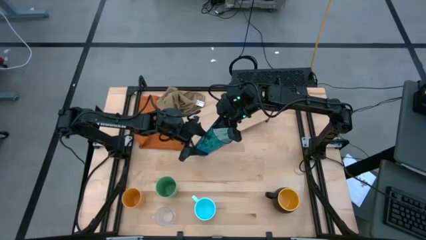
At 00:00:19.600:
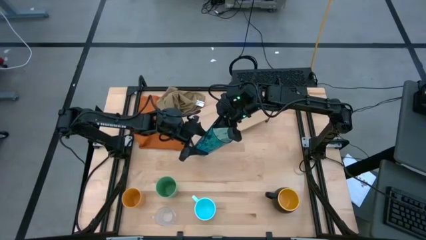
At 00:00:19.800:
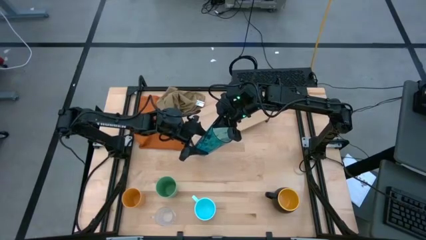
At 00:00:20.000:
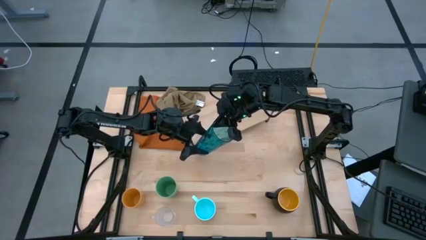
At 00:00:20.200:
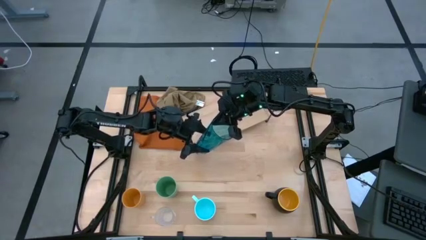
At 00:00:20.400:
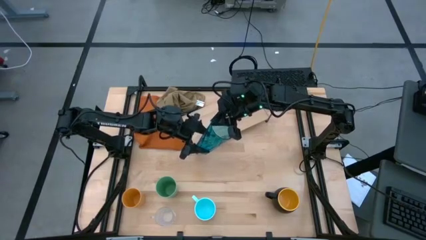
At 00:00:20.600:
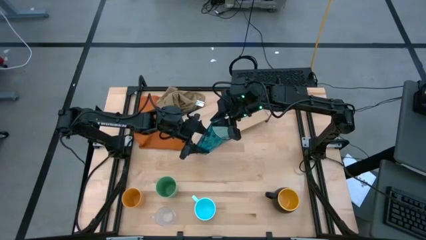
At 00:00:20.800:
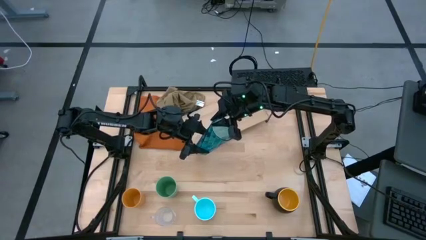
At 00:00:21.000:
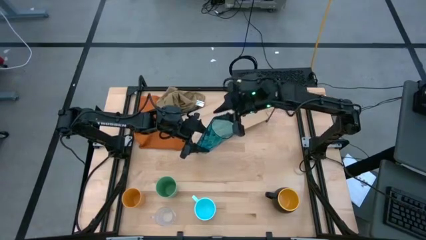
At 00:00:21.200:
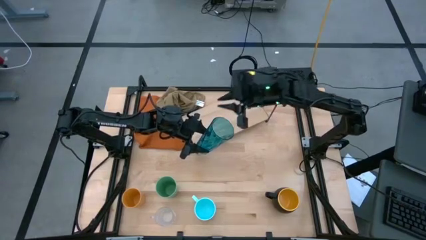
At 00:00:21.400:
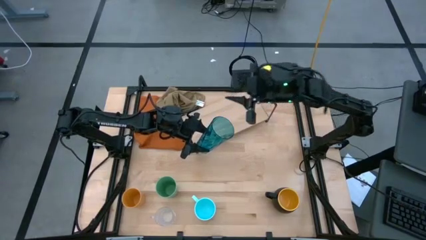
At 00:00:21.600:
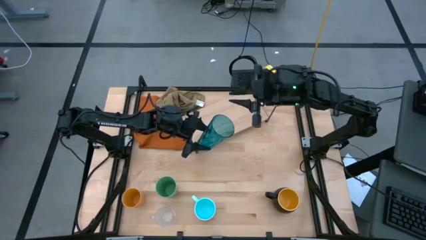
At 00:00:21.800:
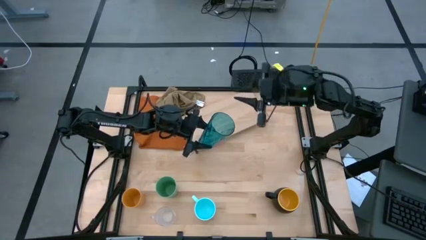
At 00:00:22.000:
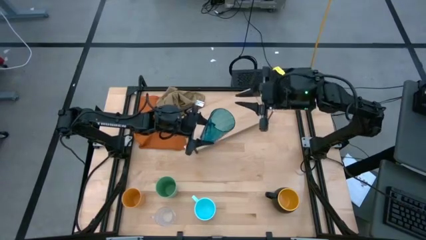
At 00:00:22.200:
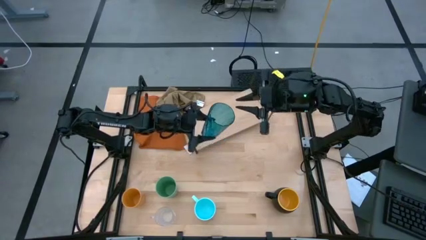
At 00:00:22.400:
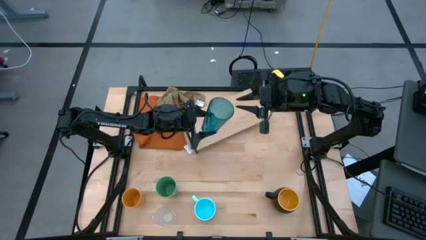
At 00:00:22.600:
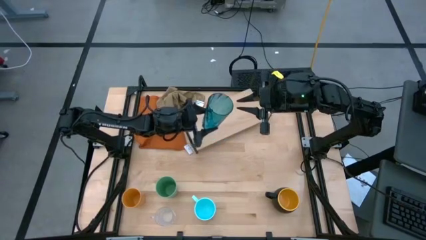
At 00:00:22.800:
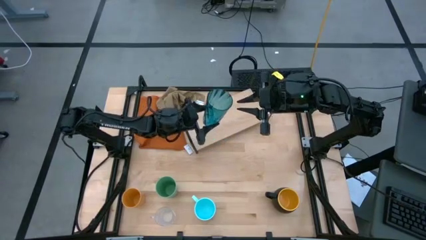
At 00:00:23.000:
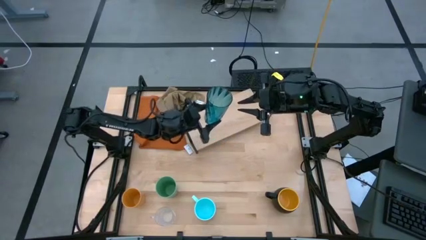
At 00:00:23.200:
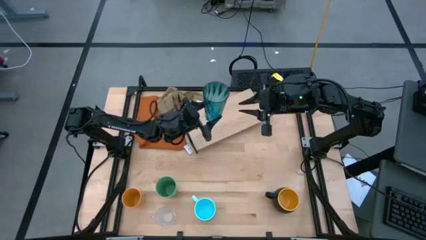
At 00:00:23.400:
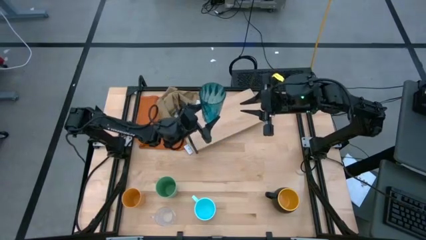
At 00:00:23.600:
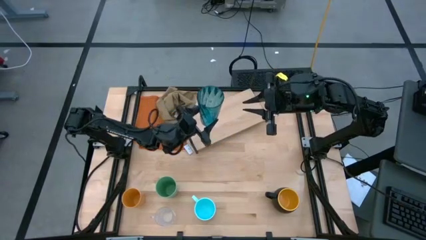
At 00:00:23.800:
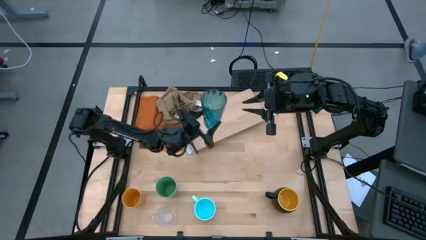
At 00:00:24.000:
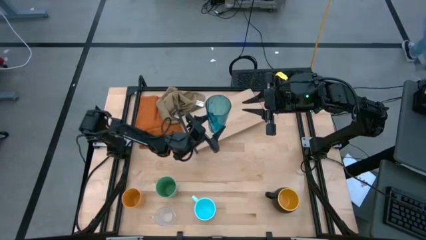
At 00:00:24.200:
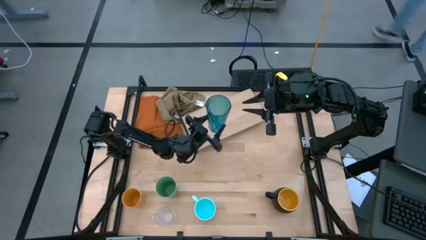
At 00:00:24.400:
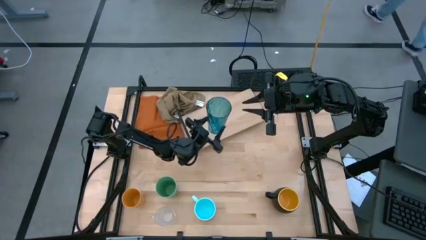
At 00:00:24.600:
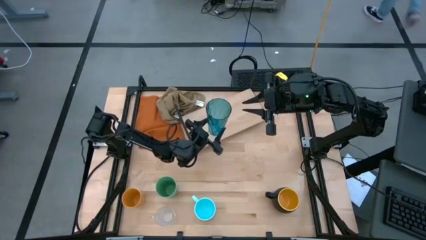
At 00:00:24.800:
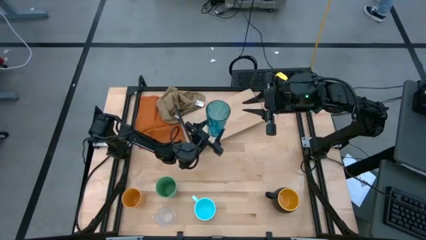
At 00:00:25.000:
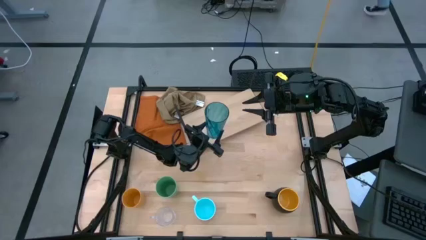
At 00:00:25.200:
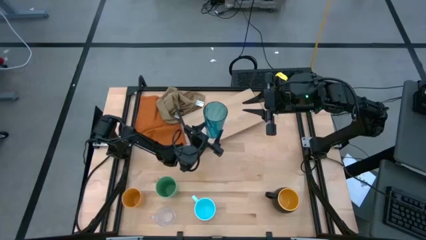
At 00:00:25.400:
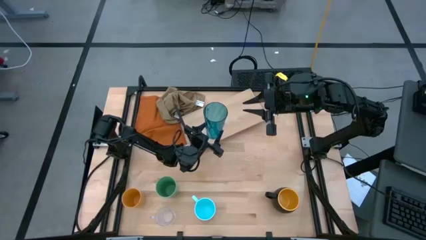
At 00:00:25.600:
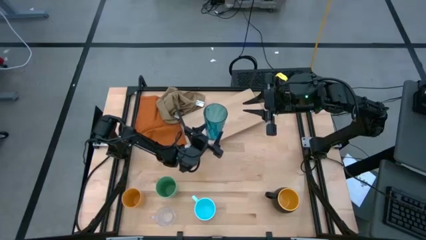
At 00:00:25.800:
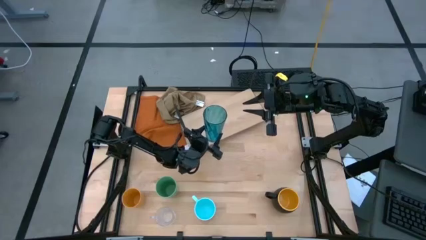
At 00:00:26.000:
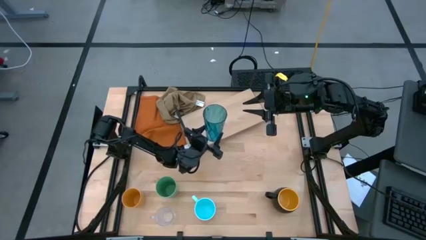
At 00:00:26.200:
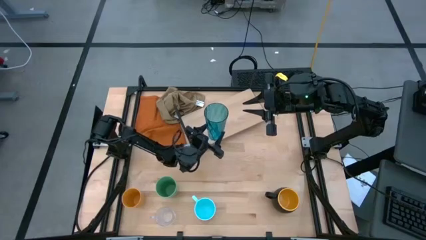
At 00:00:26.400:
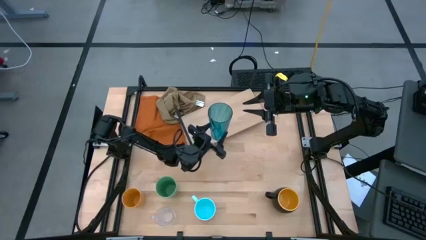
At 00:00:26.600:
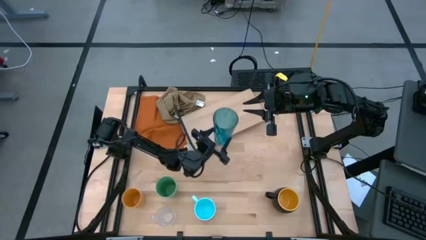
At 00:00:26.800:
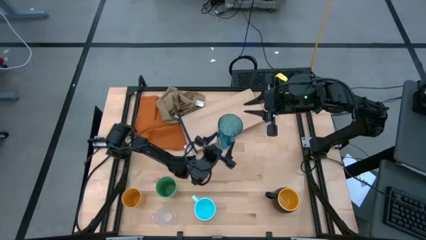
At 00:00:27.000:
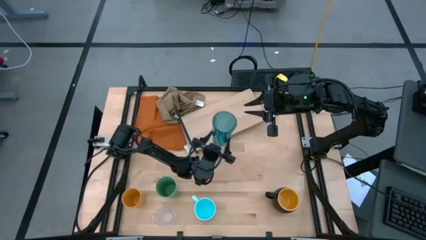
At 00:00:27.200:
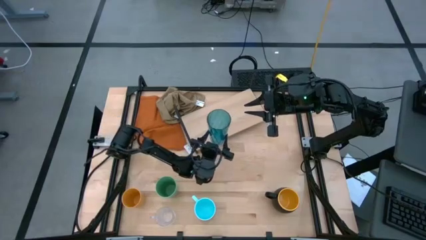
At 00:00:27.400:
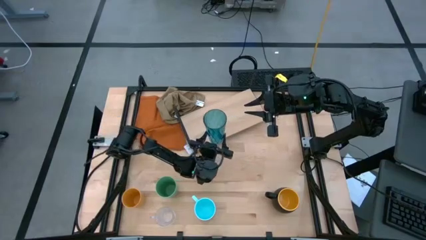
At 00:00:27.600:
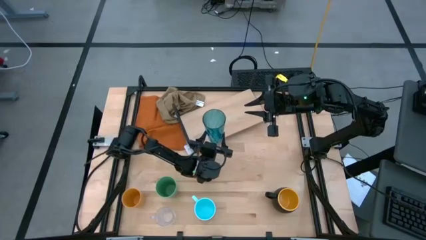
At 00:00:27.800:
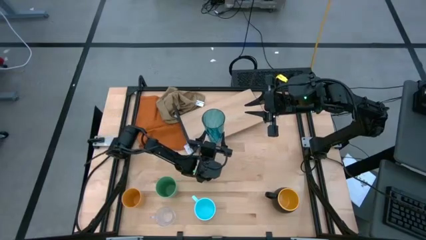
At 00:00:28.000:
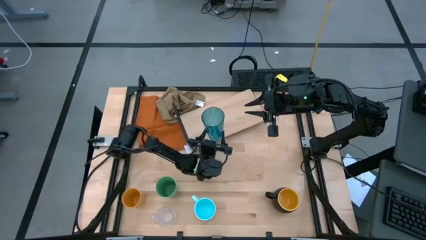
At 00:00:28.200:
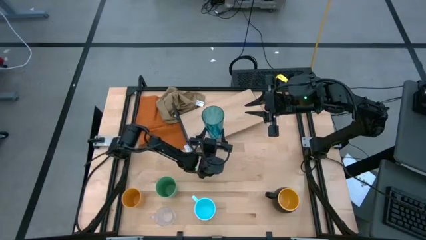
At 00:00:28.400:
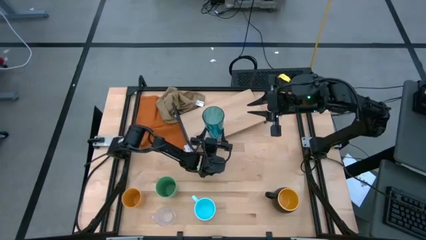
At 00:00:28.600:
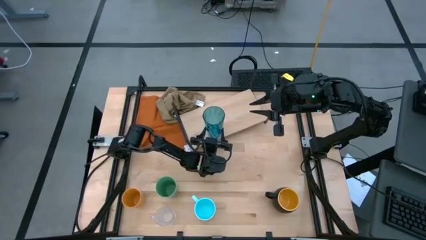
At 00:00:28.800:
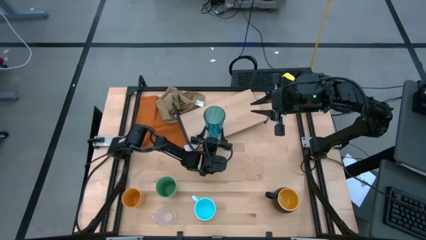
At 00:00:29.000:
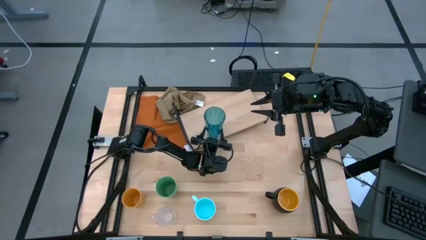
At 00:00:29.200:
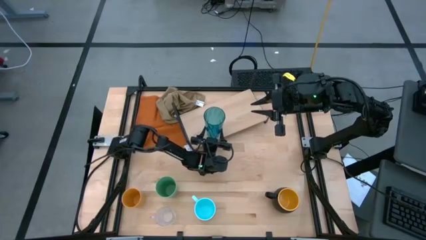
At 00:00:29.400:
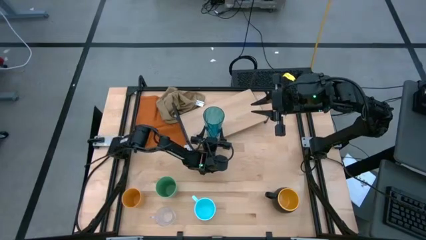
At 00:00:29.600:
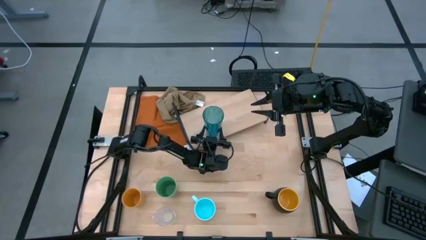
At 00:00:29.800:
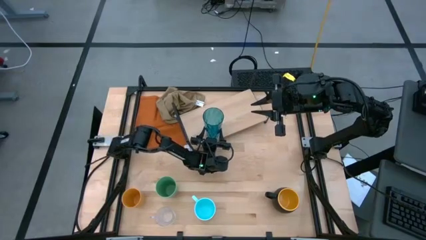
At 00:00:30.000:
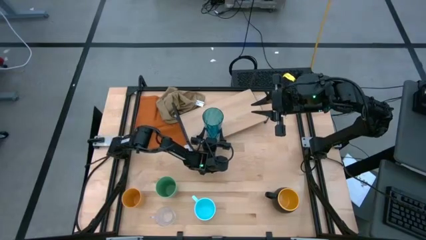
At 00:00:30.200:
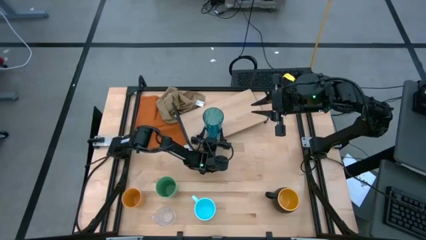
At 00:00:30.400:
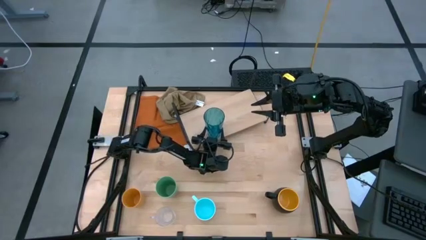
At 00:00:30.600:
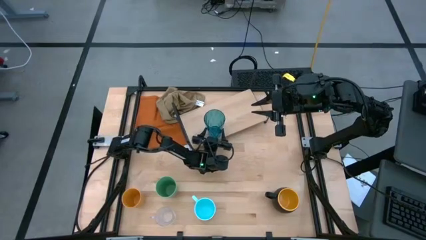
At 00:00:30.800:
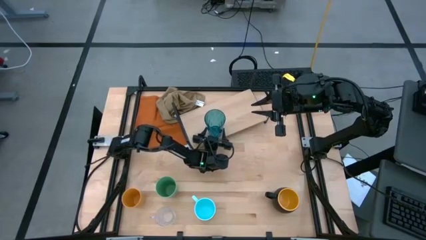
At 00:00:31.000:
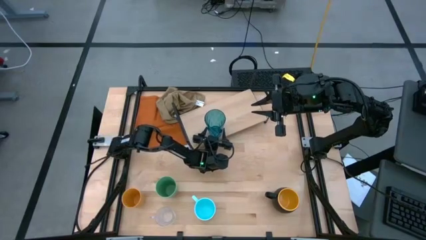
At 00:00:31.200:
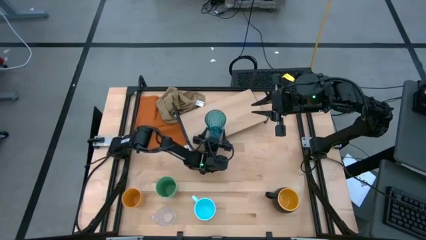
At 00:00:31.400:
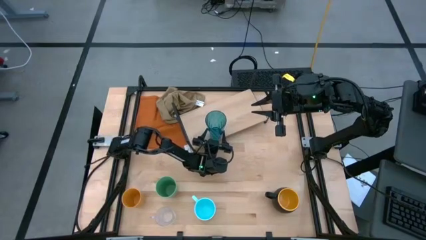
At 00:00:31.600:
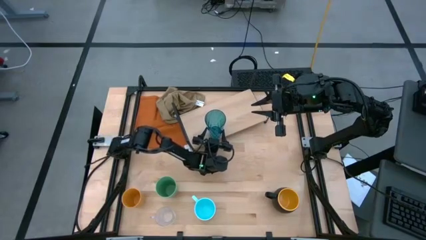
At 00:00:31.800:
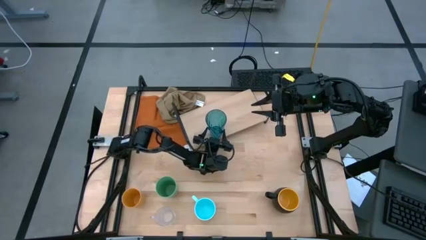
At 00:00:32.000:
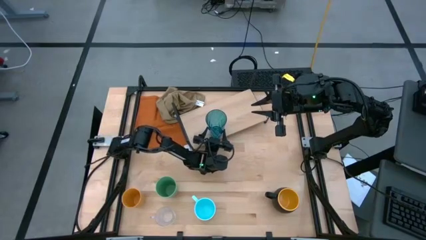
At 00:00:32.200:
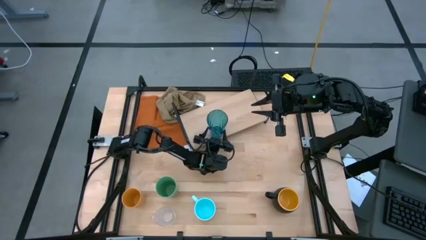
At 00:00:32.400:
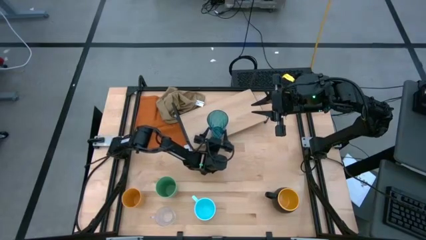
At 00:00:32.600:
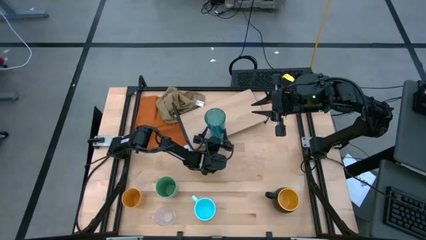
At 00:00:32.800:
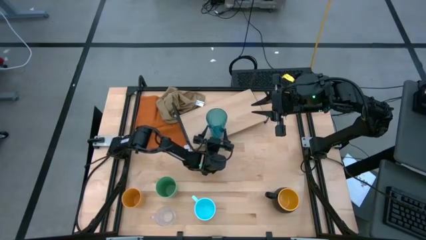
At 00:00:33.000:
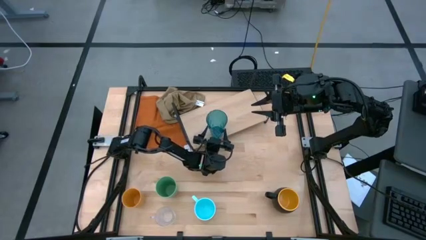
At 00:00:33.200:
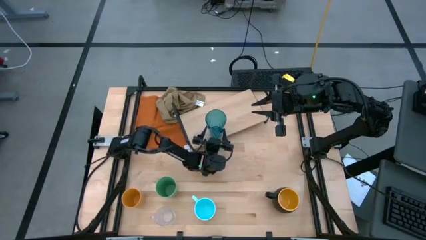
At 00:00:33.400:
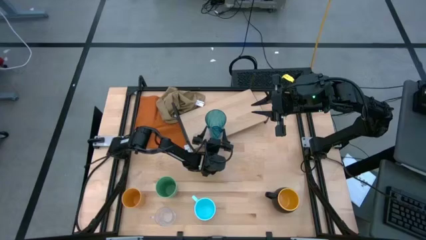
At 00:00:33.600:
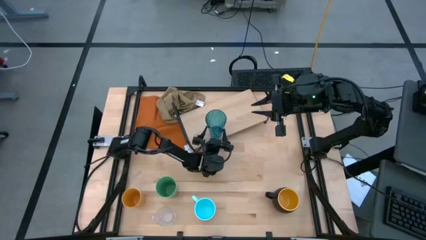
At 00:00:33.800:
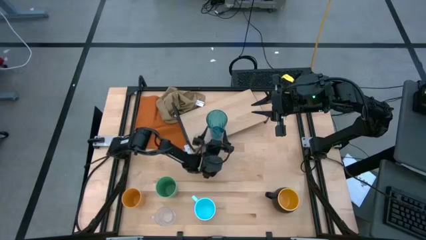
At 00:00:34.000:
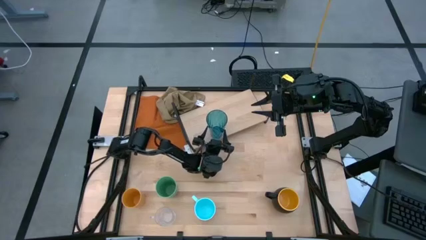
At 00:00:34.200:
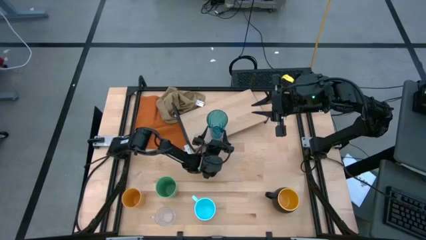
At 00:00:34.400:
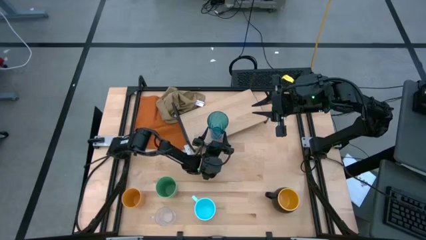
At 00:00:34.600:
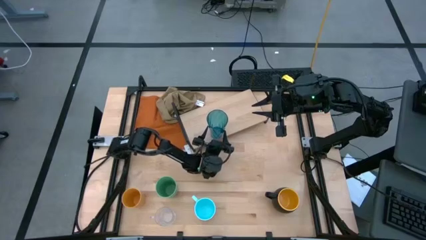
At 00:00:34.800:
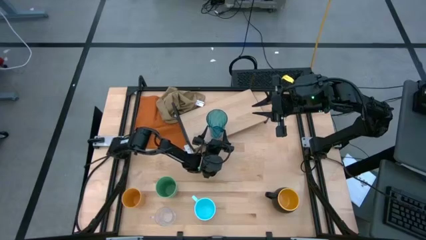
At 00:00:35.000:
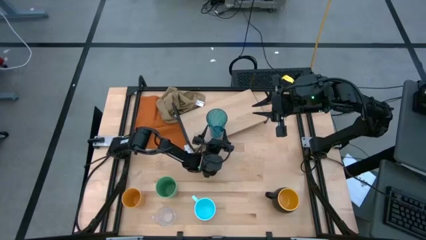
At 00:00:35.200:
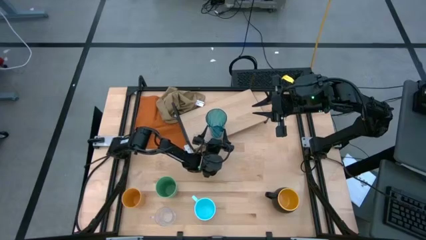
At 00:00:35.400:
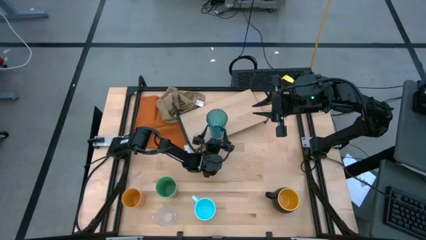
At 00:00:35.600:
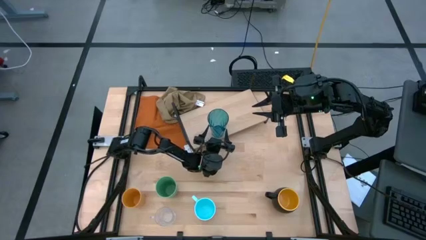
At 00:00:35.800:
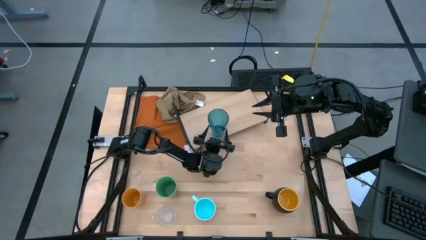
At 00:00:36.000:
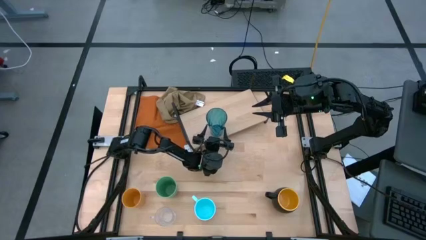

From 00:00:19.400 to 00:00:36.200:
Task: Stack small to large cups/mugs on shelf
Put the blue cup on the shelf
